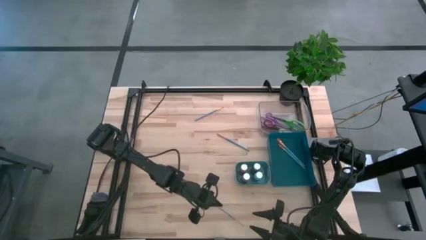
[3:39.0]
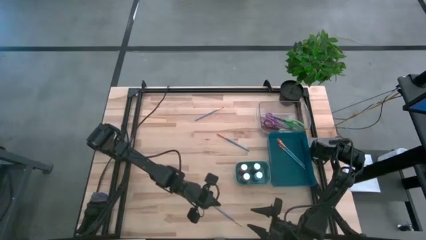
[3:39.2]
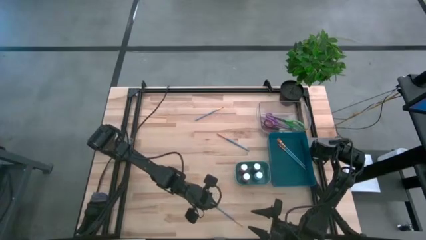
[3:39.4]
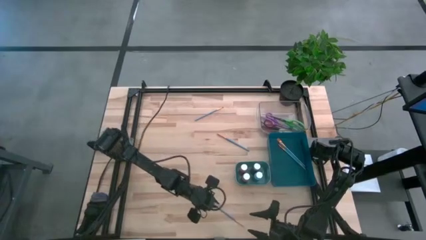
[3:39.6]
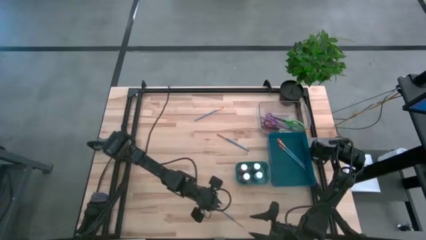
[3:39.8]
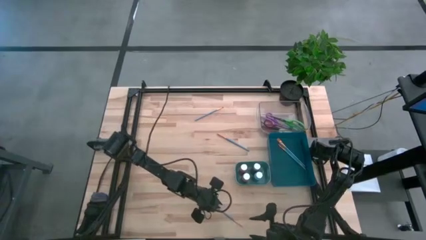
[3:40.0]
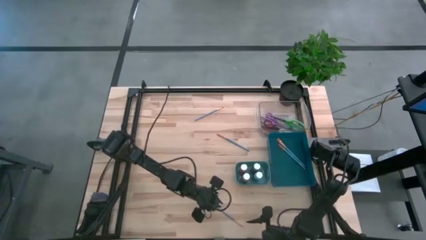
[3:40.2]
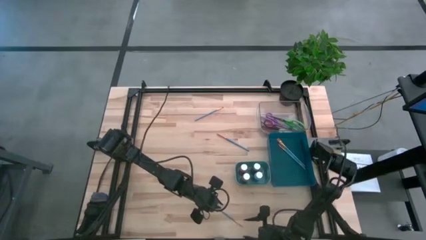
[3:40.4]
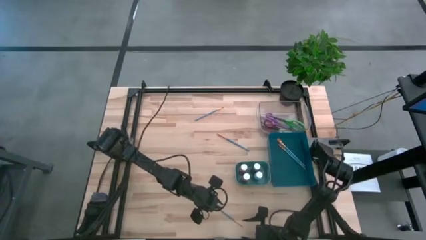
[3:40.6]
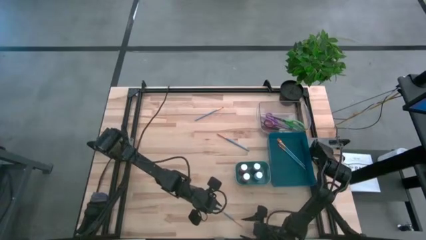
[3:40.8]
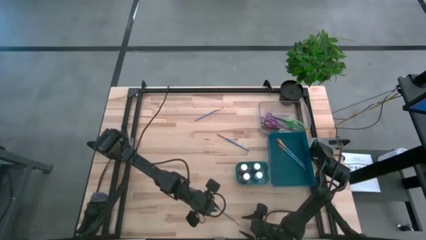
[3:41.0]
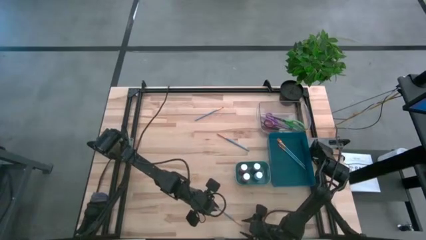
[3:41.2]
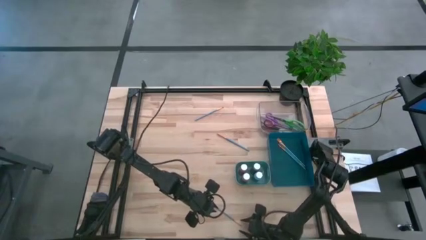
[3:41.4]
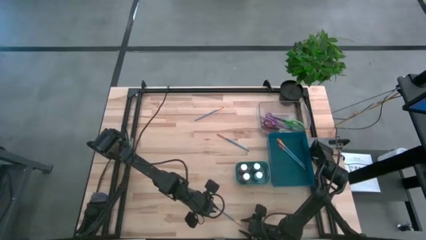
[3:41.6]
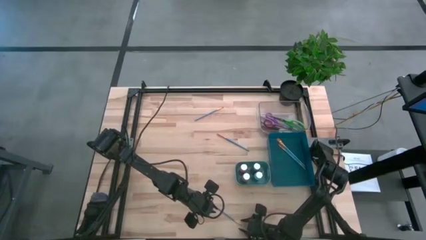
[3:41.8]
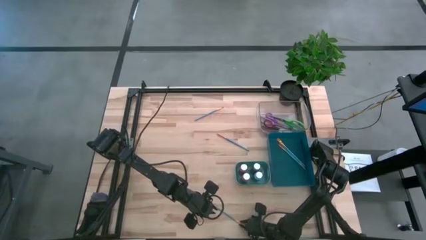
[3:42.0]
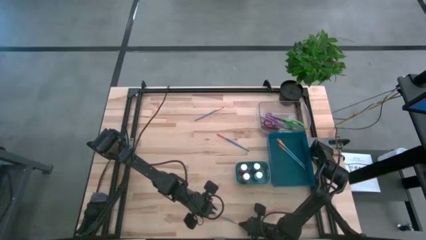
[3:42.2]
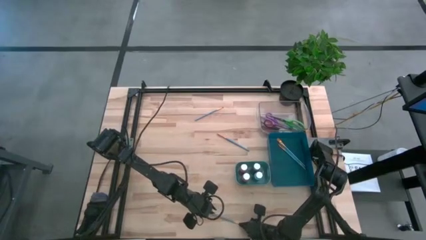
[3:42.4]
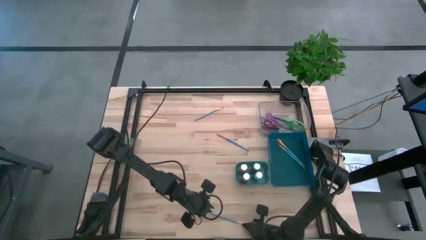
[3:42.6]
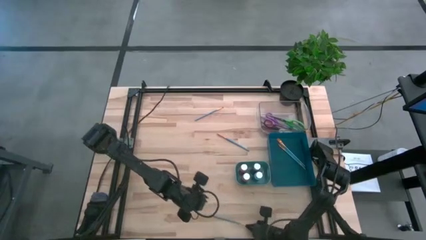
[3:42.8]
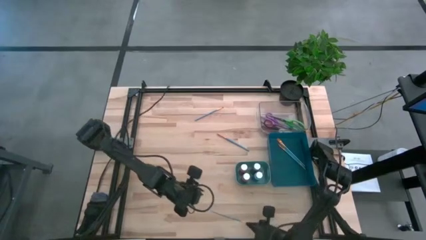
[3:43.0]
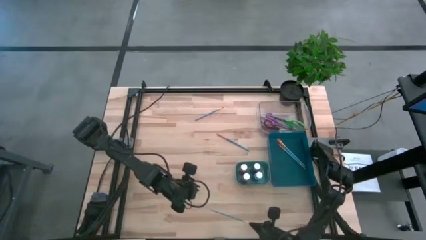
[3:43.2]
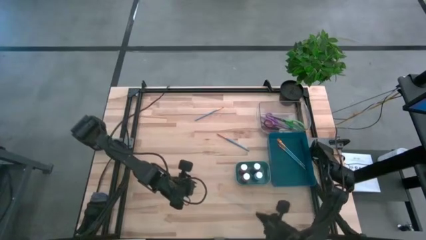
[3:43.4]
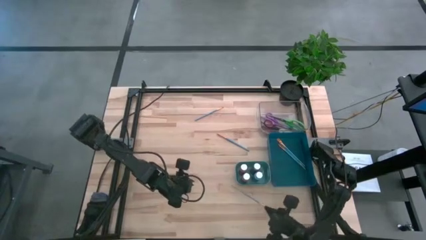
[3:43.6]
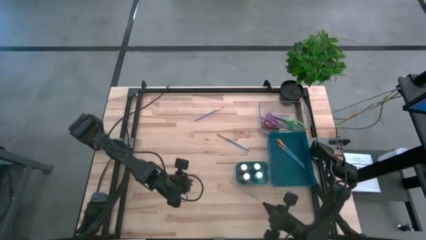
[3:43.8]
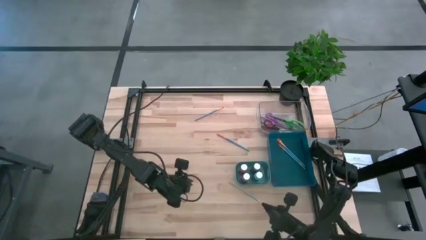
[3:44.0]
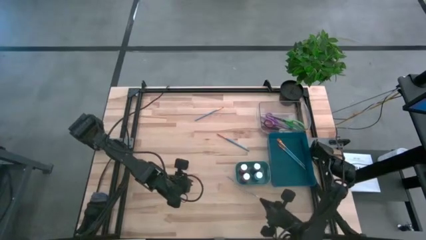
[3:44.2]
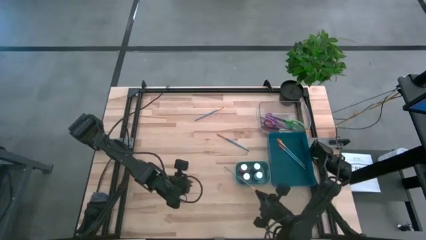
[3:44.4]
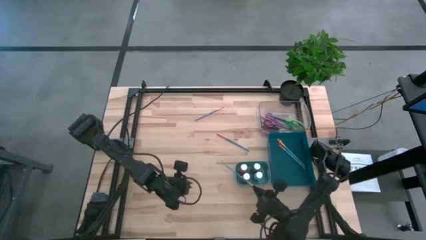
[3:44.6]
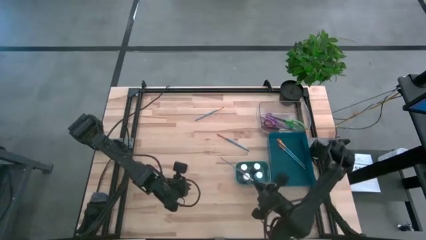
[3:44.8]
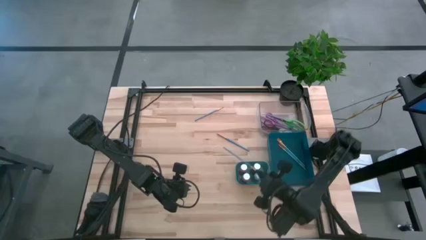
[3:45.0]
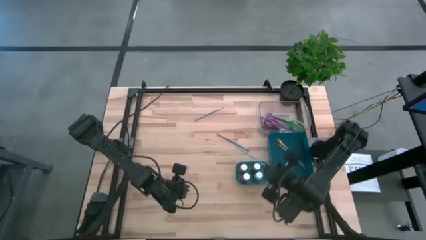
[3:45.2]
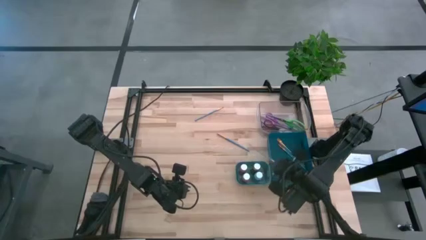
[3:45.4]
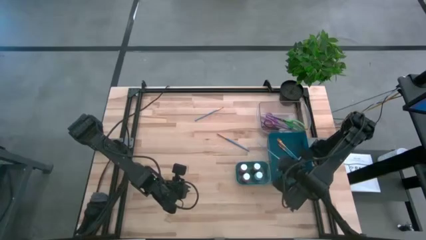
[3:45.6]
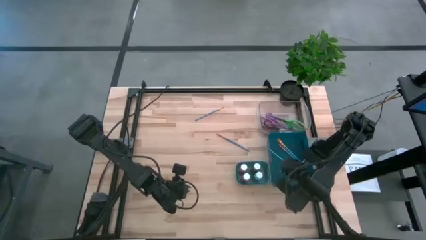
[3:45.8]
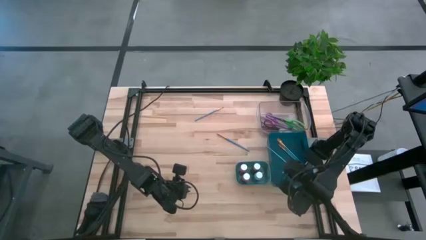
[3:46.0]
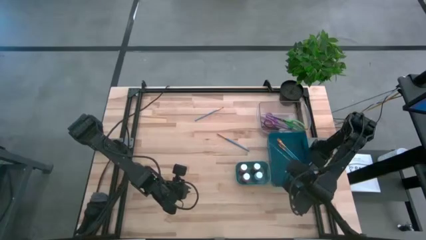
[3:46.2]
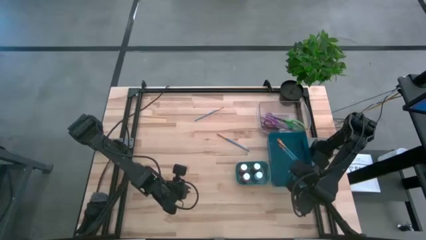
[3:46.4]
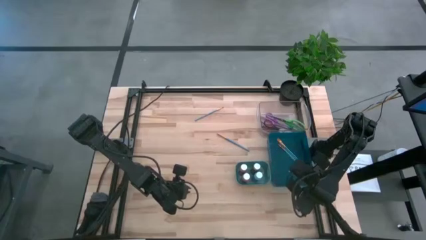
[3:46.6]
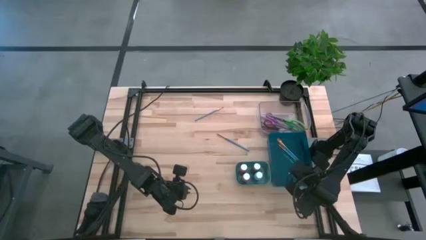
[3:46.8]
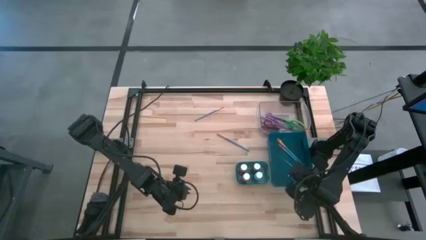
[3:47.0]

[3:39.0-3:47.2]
Task: Pick & Place Paint Supplies
Put the blue paintbrush into the blue bin

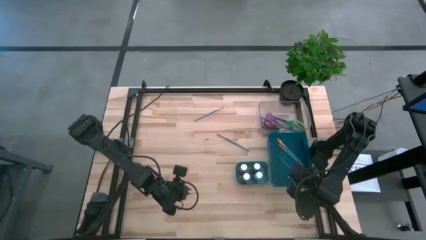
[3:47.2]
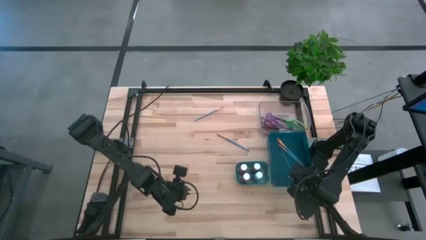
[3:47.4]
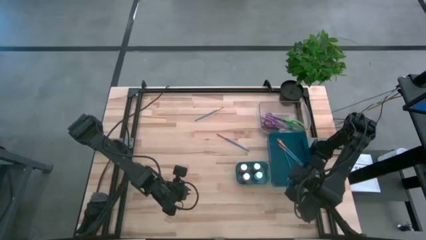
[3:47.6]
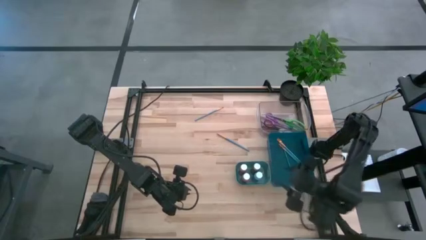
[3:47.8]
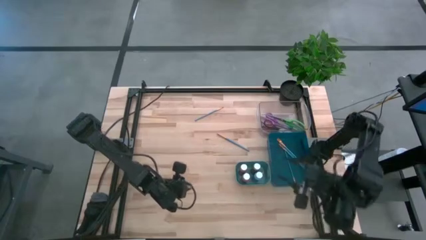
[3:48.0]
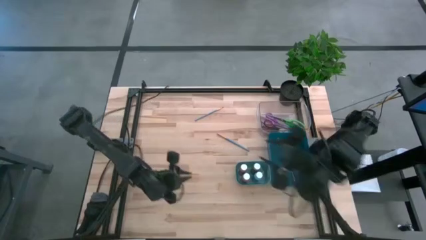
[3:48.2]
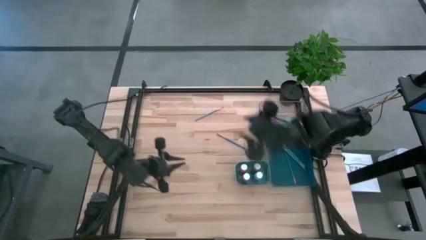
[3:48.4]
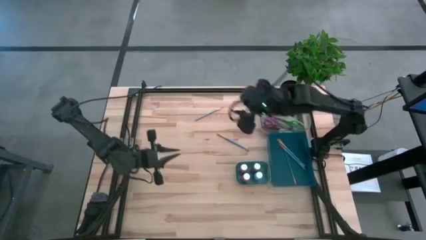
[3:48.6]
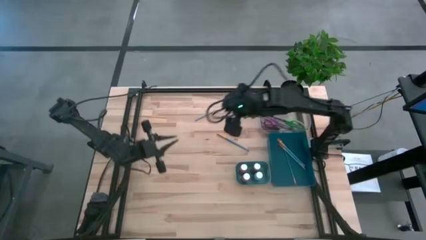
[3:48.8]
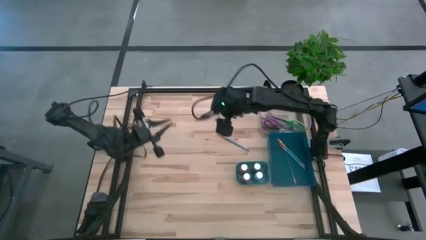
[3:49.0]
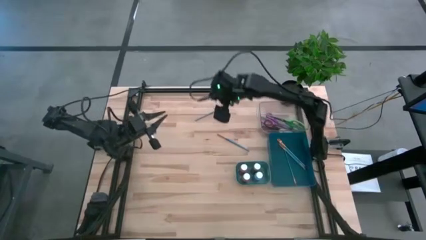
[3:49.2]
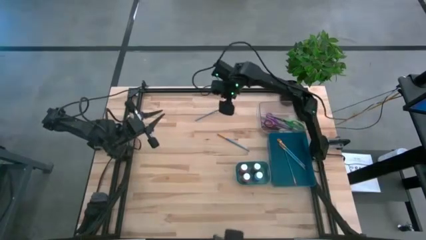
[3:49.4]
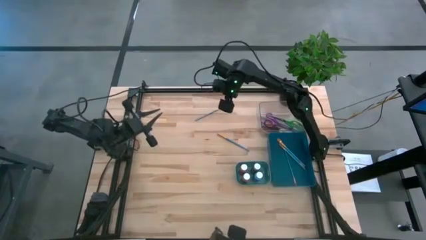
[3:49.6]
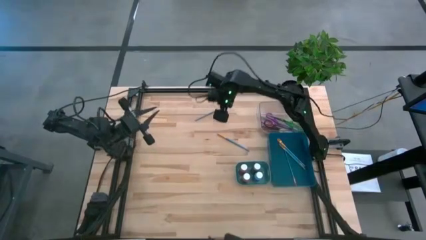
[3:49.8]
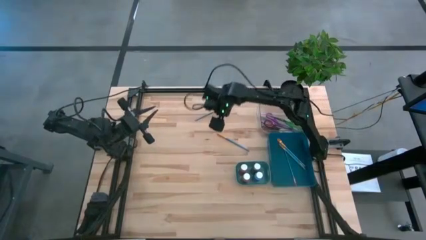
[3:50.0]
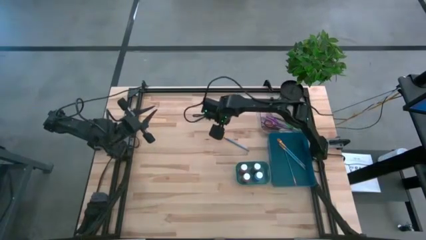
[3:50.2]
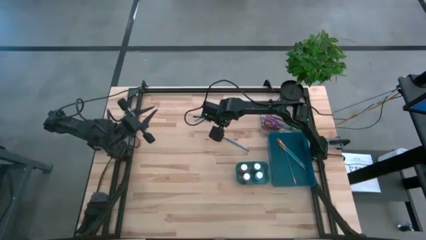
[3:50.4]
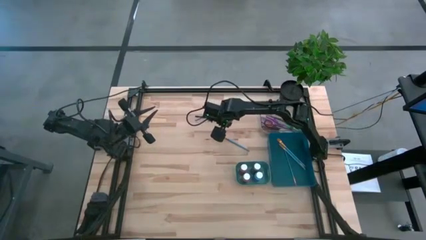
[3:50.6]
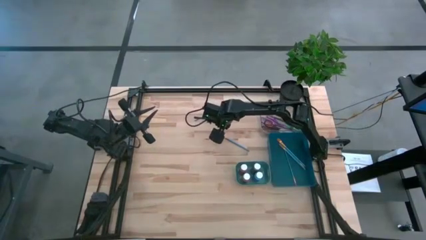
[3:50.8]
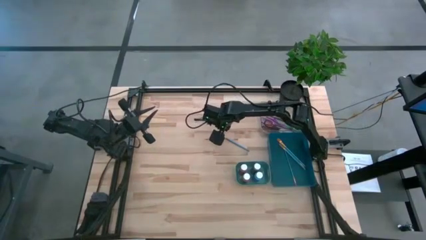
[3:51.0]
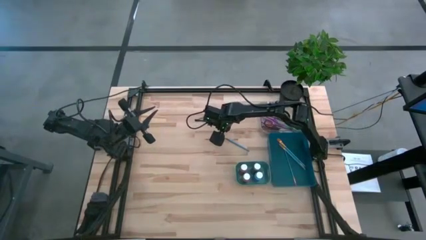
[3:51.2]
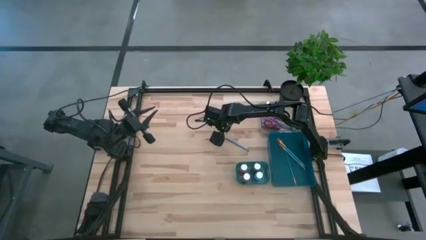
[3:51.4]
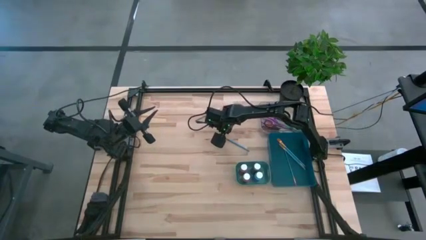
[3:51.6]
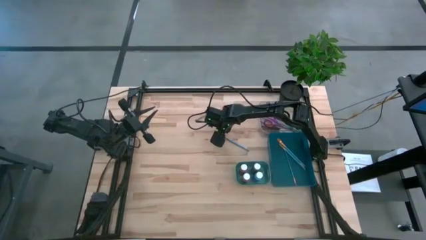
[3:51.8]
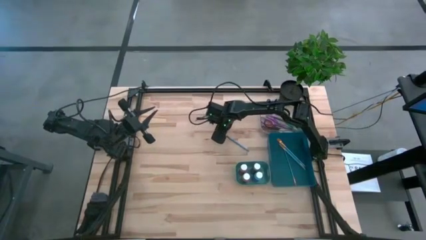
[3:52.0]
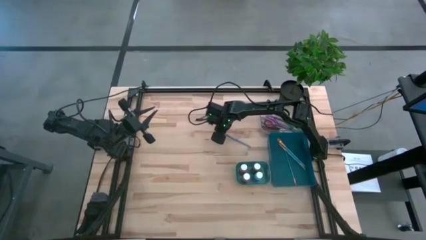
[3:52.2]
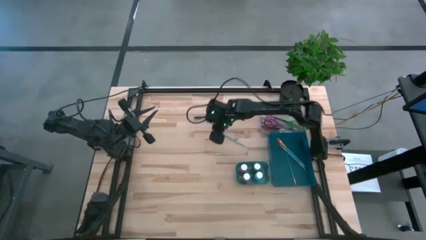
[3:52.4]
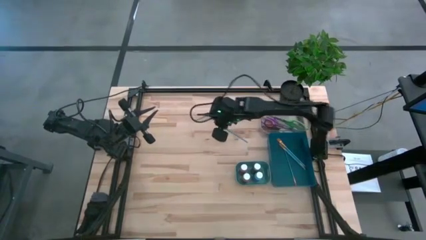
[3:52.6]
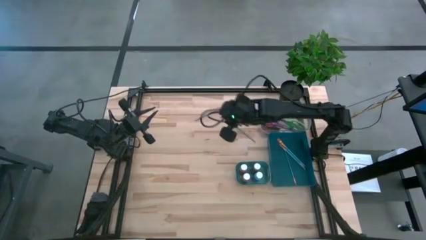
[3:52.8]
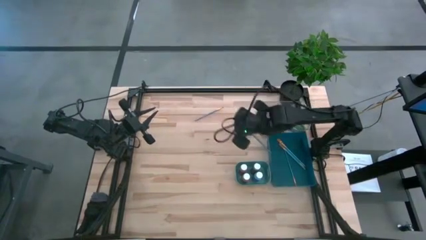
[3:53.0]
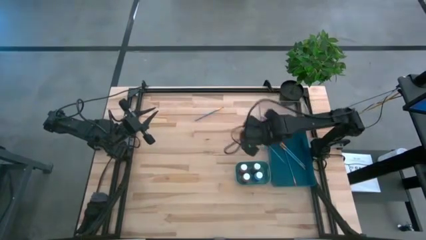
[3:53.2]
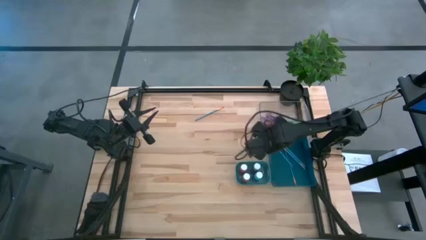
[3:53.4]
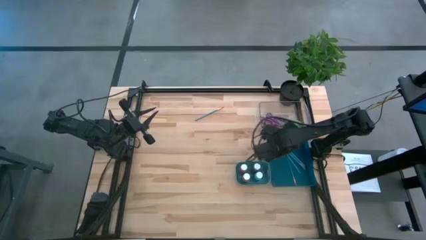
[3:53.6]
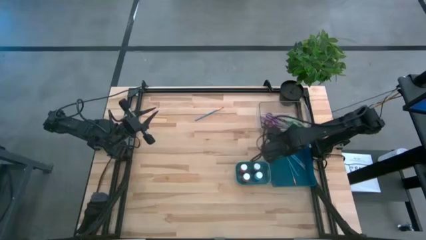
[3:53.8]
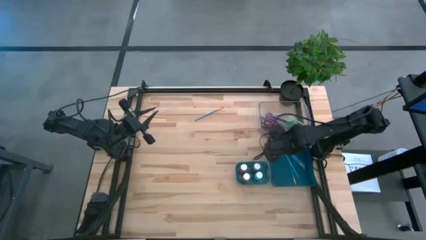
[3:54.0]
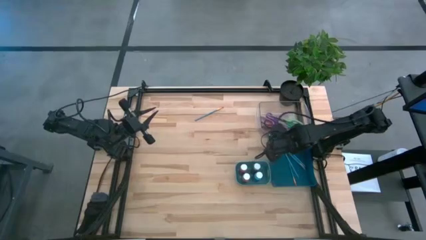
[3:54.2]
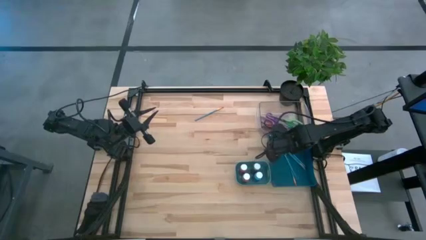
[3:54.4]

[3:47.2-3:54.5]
Put the blue paintbrush into the blue bin

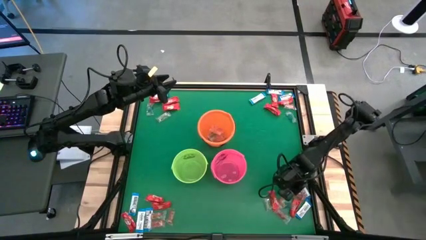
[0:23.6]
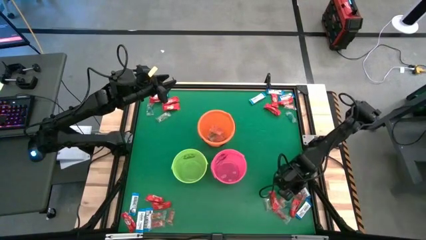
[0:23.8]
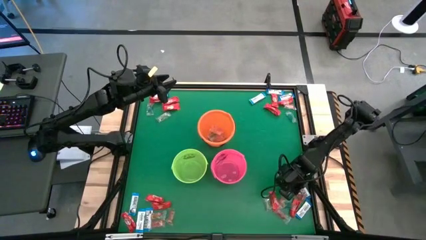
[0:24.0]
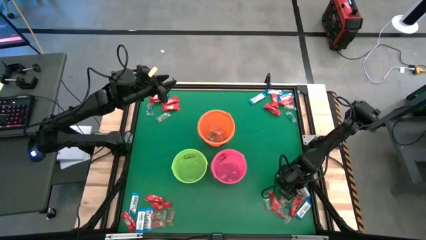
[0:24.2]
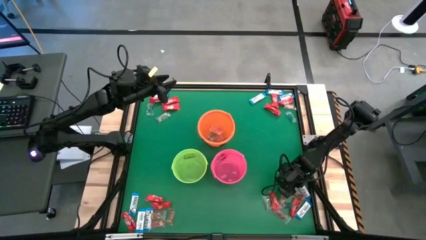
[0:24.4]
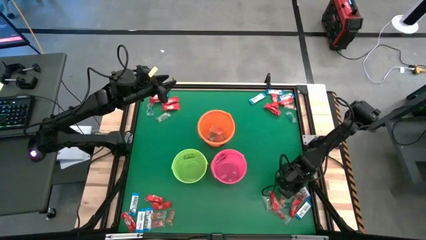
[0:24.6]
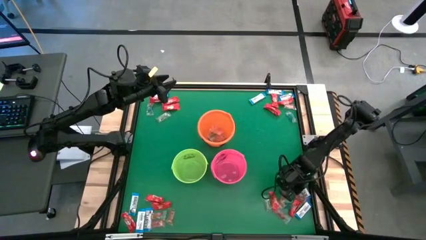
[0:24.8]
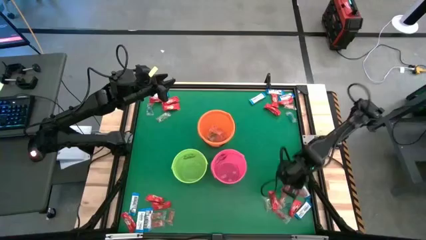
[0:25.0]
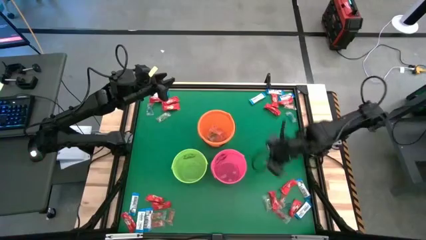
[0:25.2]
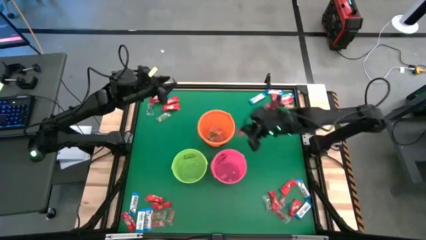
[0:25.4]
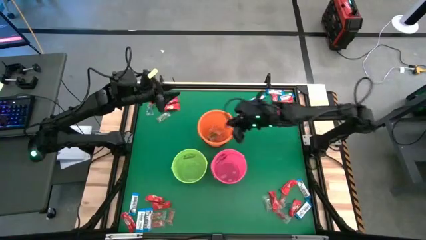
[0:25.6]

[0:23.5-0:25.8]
Task: Sort candy by brand, put in halloween buckets
Put the orange gummy into the orange bucket
